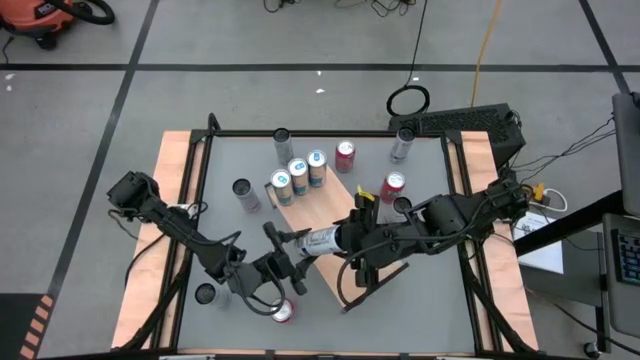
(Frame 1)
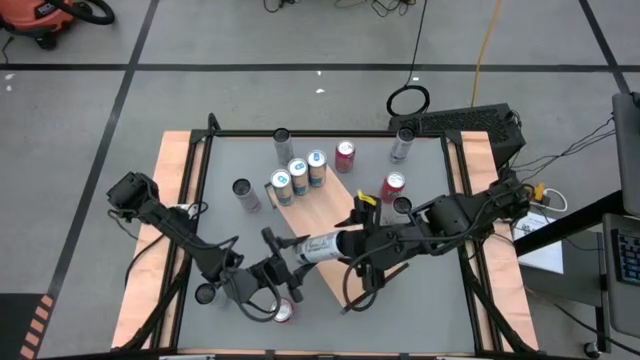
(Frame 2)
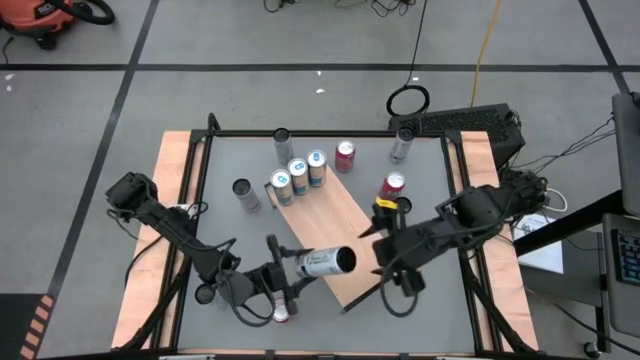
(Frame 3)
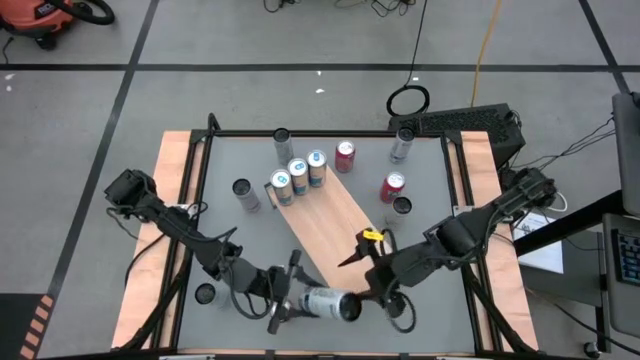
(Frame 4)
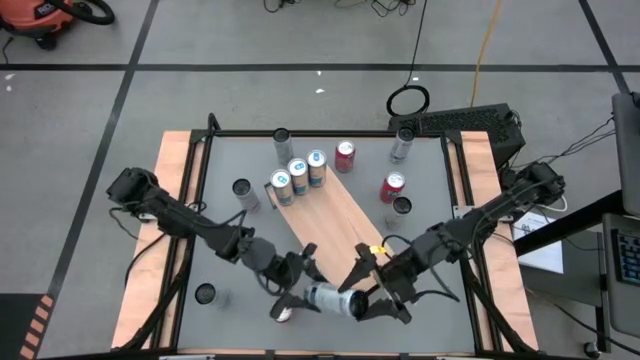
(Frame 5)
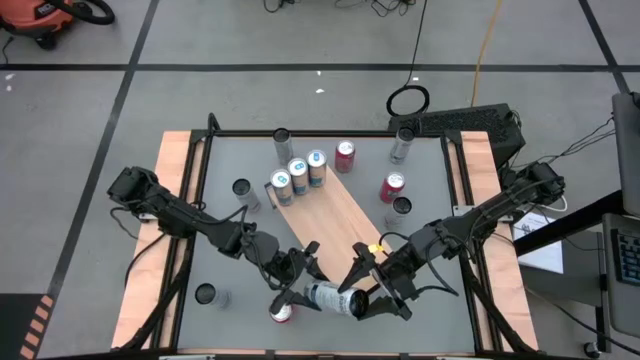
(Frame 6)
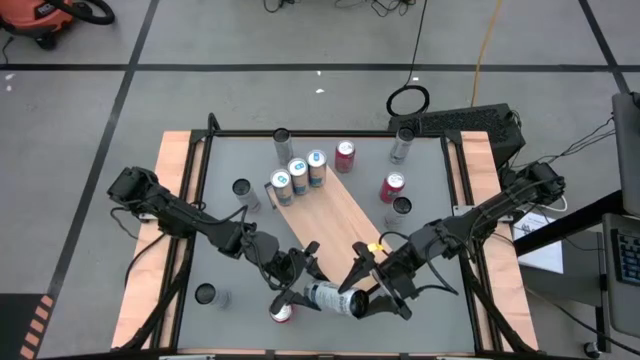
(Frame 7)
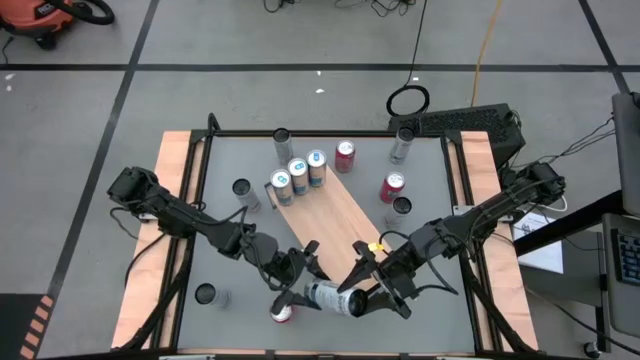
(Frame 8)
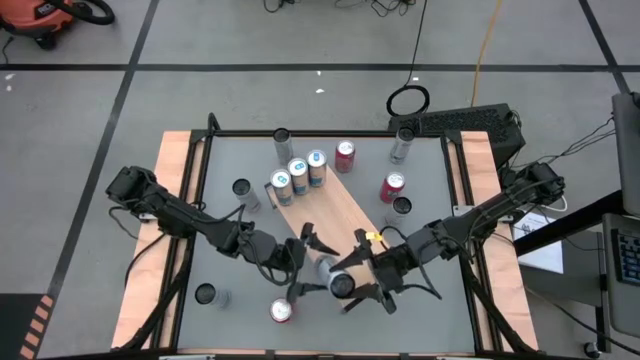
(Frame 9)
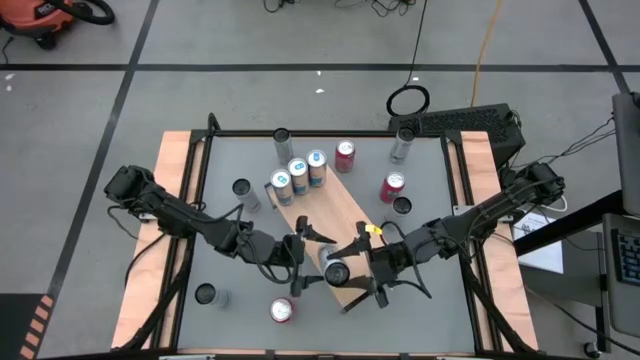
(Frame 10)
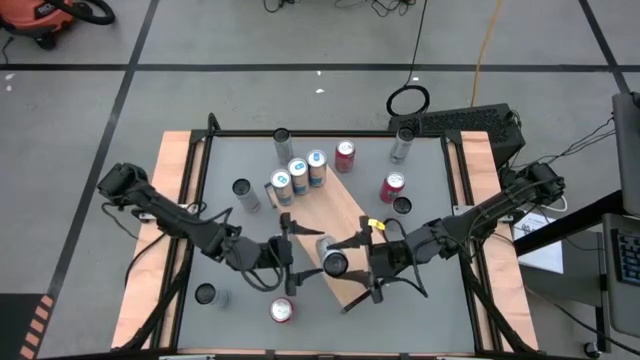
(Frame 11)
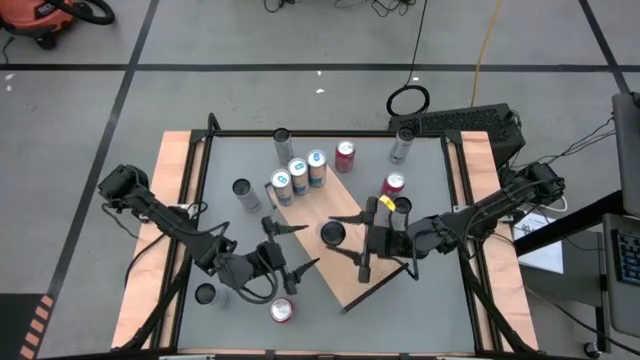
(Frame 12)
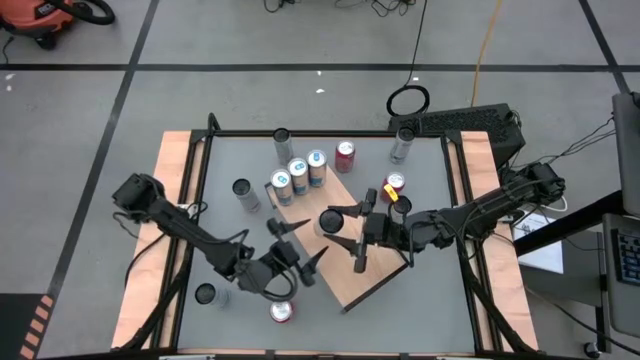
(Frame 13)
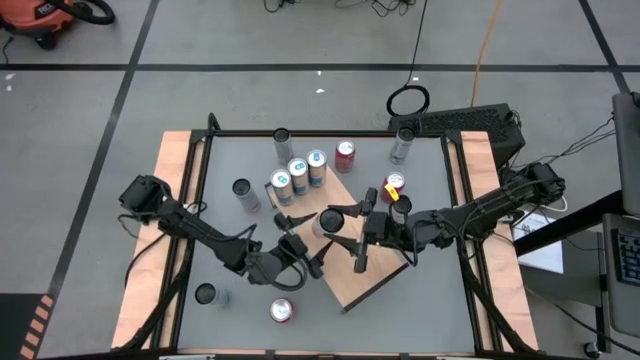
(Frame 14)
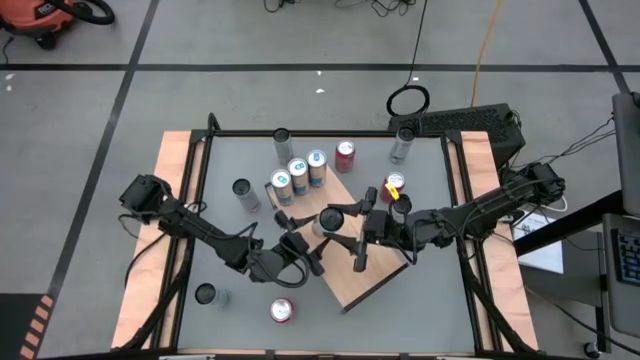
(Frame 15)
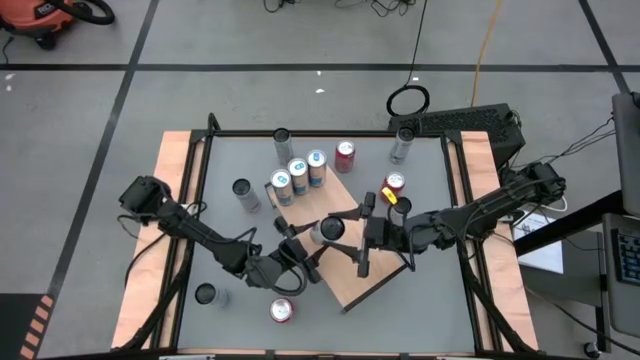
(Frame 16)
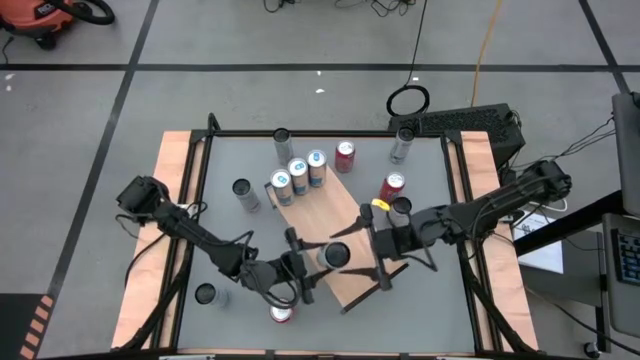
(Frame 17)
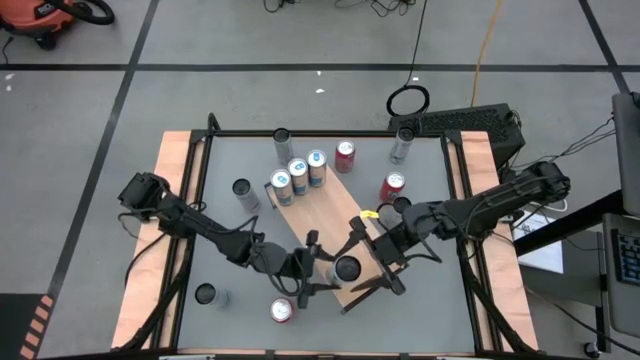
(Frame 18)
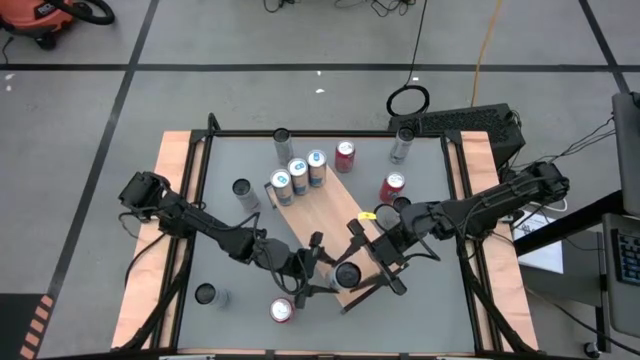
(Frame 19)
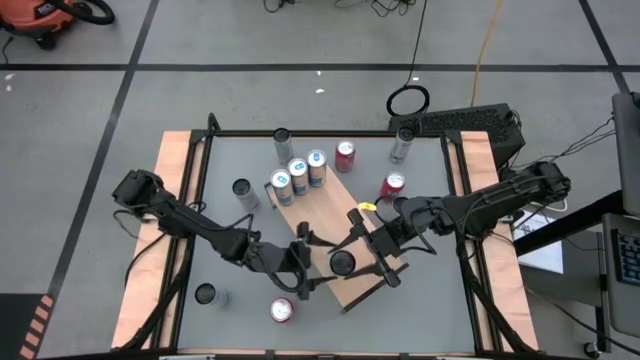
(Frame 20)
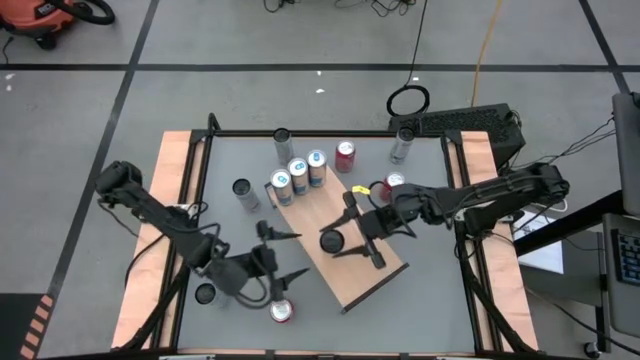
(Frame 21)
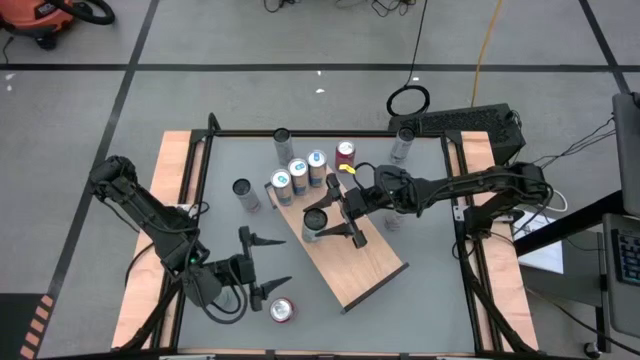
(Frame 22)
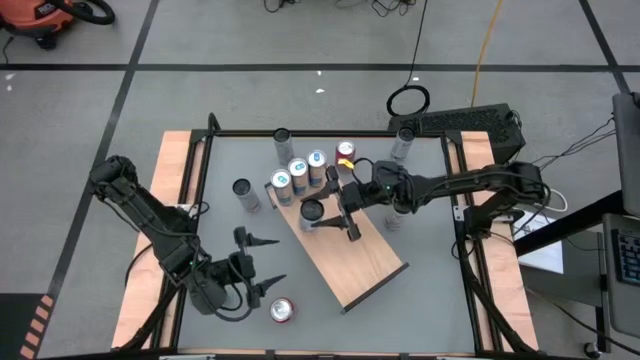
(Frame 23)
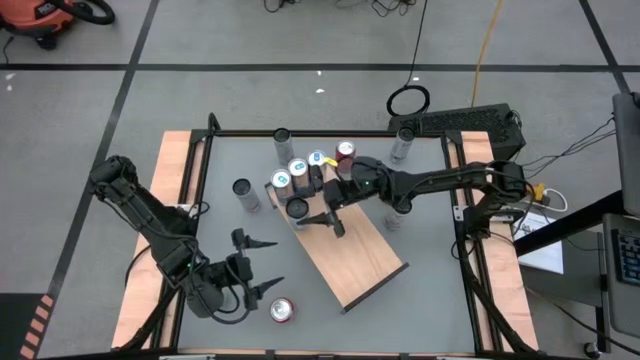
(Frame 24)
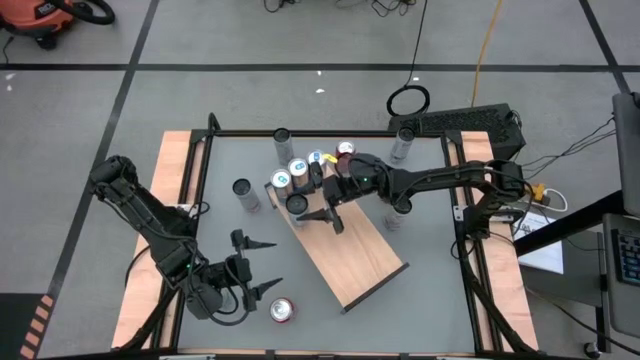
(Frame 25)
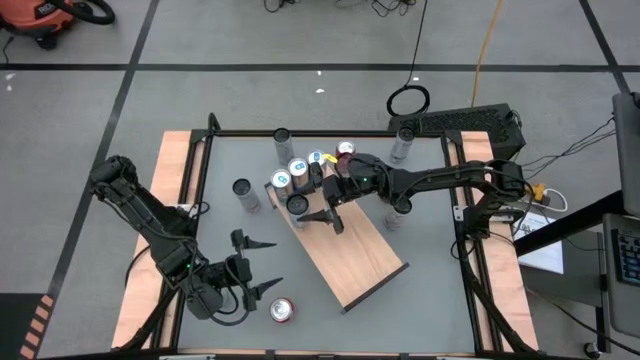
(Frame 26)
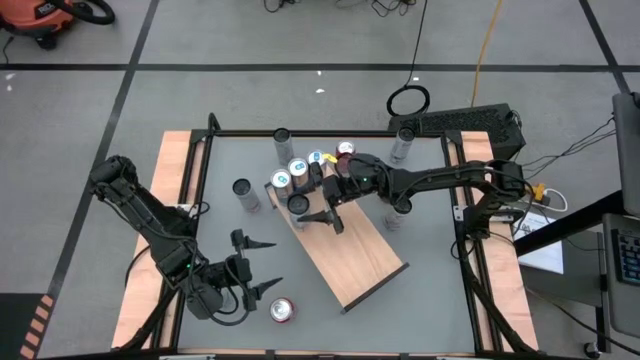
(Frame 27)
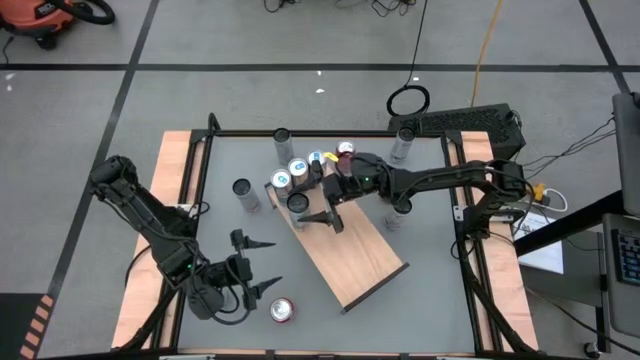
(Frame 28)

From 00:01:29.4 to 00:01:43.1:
Task: Place canned beverage on shelf
Put the bottom right white soda can on the shelf

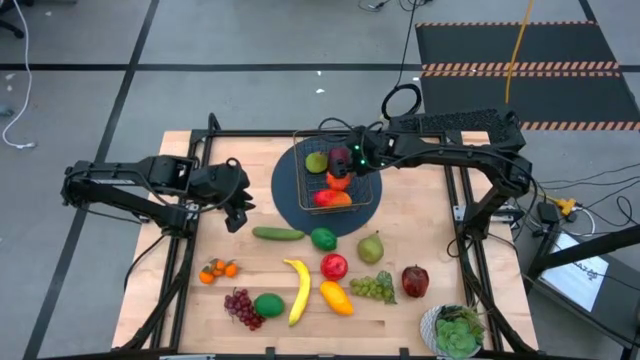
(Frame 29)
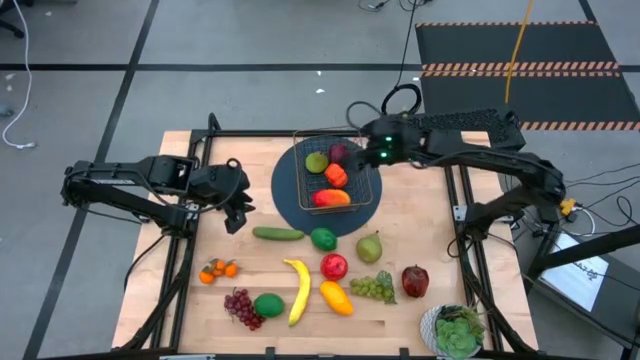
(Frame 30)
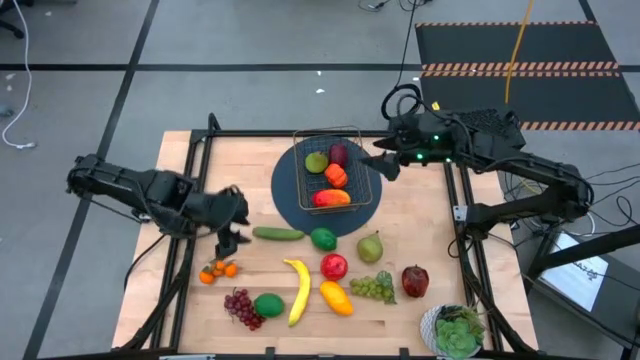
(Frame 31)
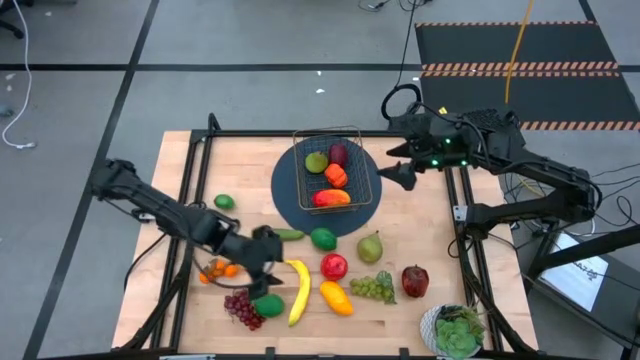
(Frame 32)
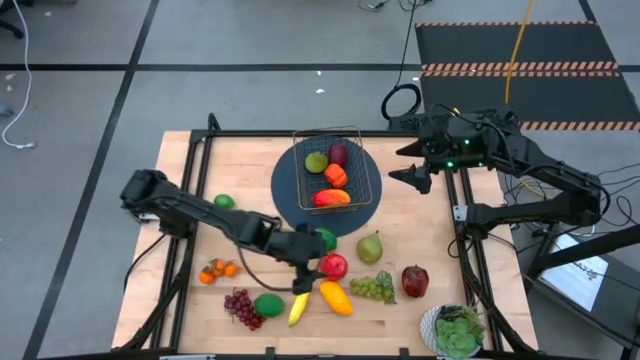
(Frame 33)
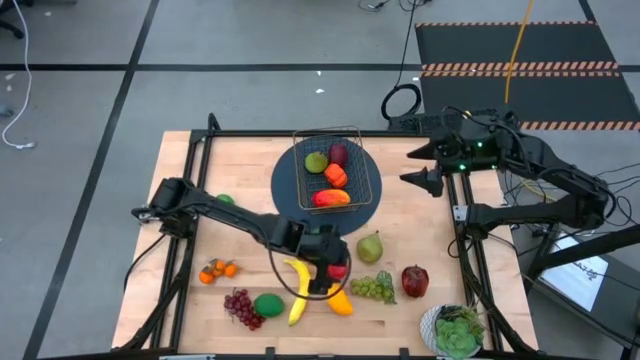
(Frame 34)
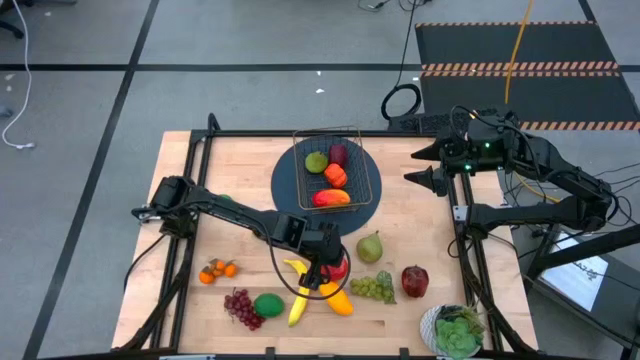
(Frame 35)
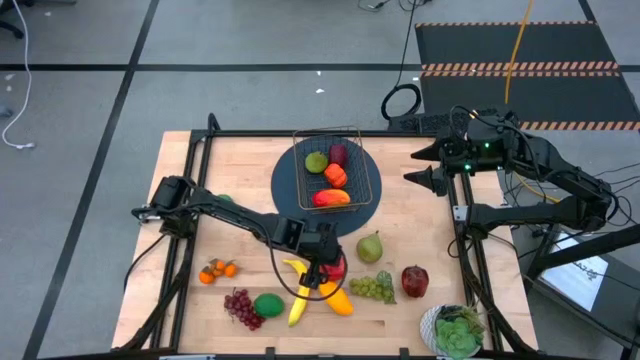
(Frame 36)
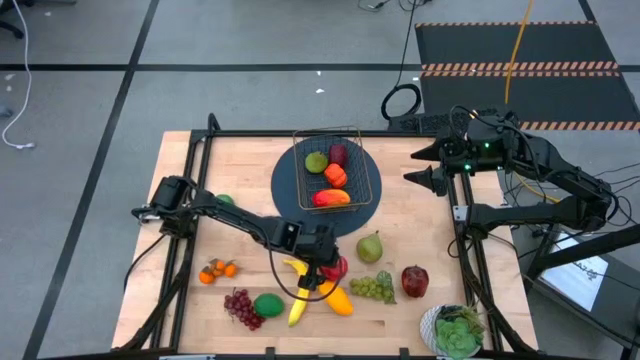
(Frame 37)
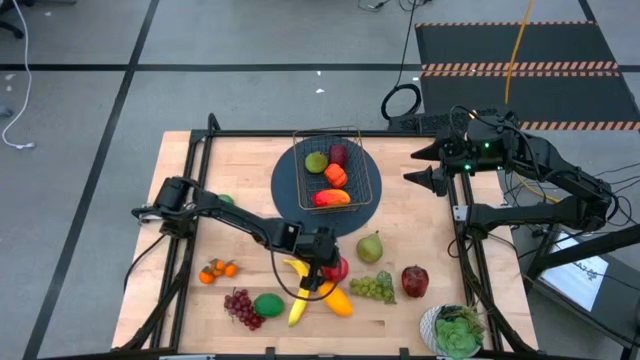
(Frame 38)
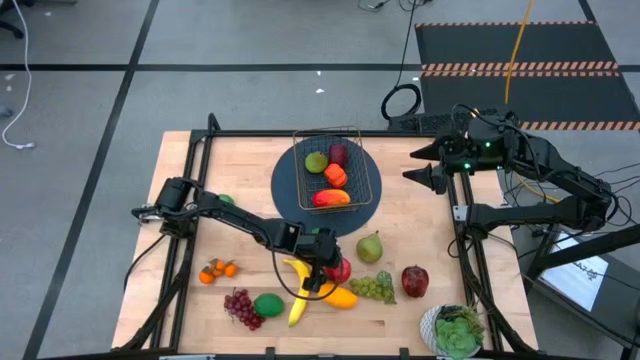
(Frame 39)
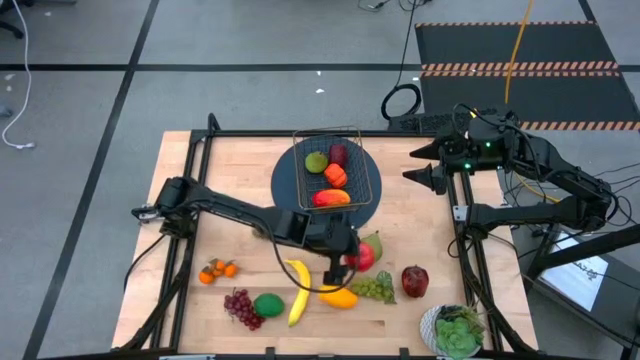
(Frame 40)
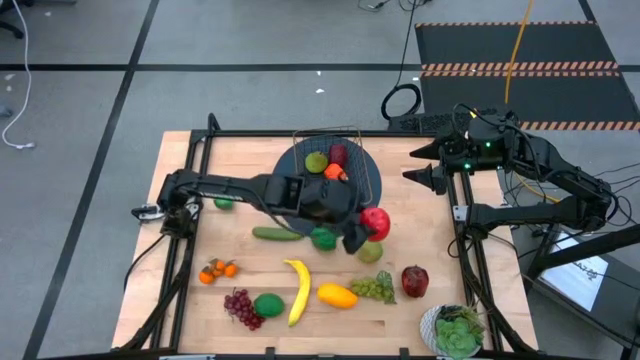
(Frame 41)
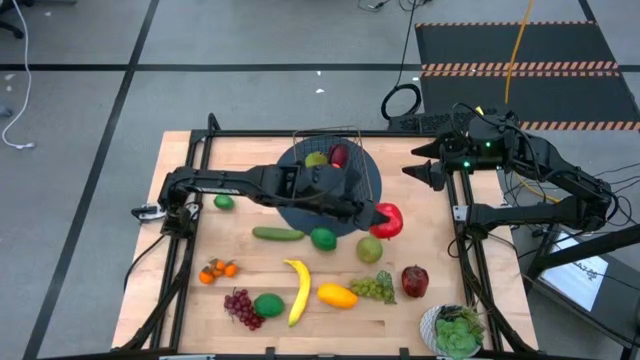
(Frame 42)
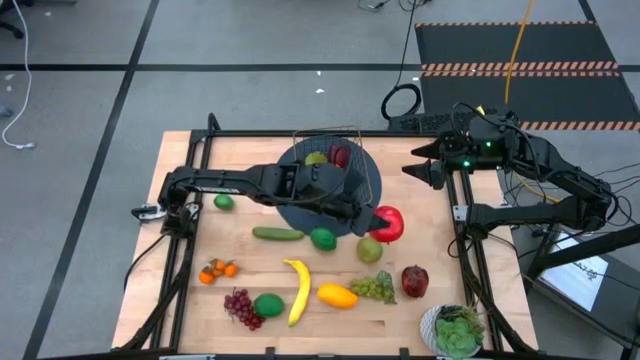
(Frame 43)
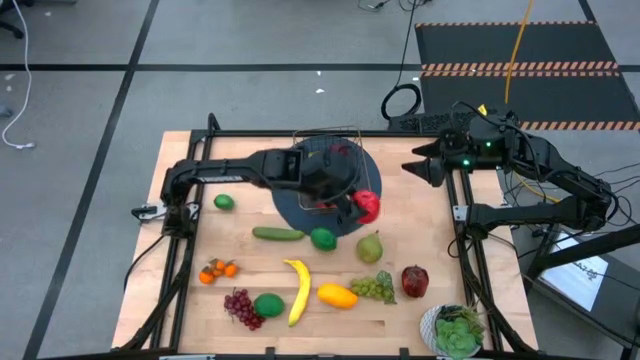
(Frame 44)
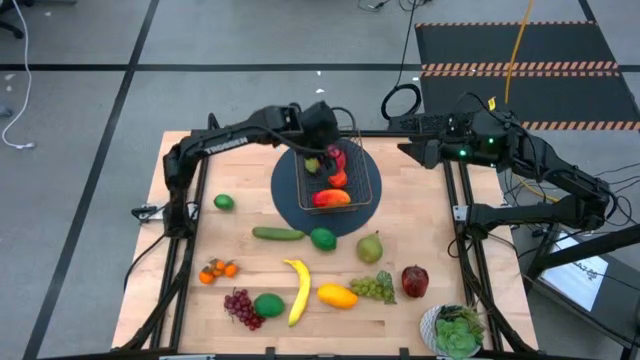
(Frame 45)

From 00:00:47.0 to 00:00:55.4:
Task: Build produce basket
Put the red apple into the gold wire basket
